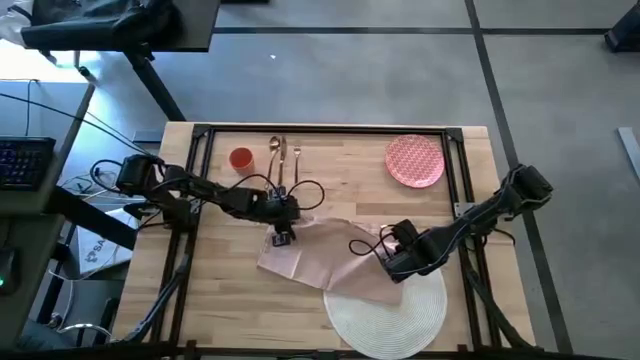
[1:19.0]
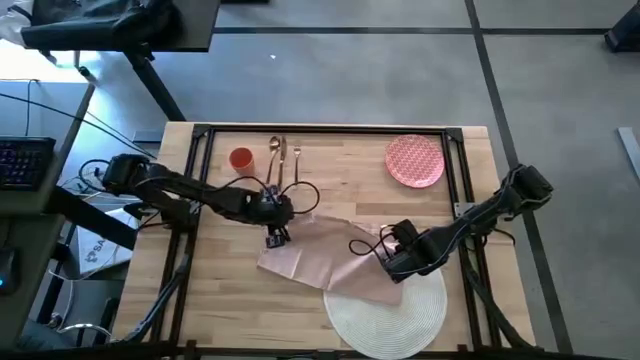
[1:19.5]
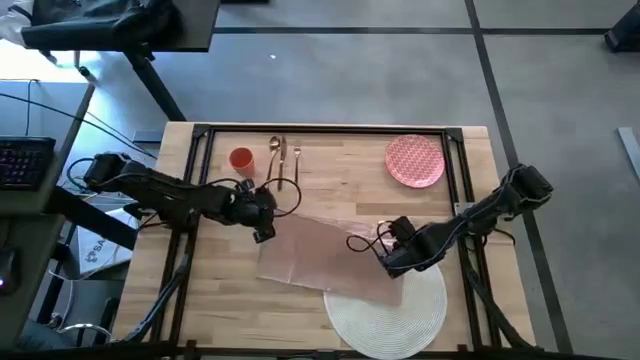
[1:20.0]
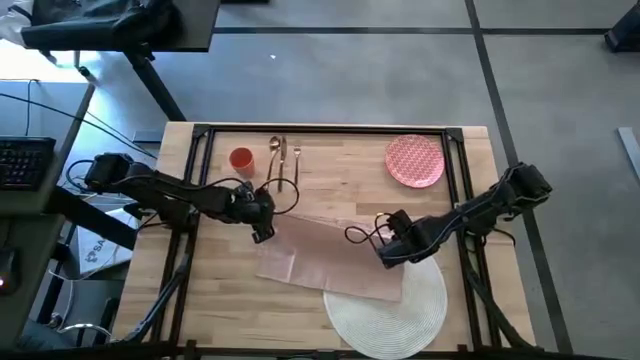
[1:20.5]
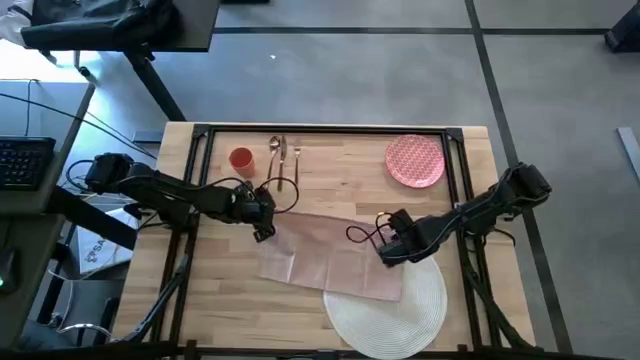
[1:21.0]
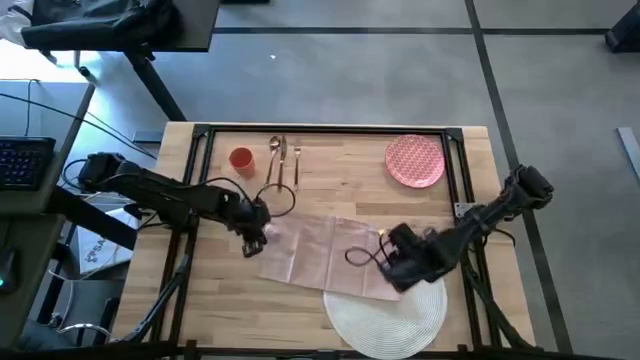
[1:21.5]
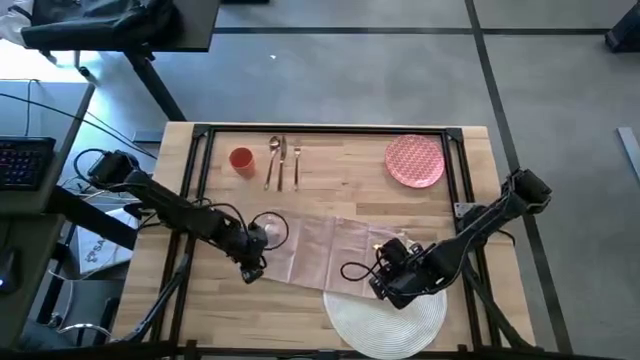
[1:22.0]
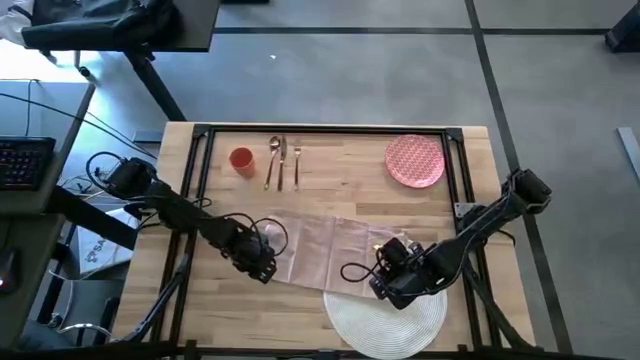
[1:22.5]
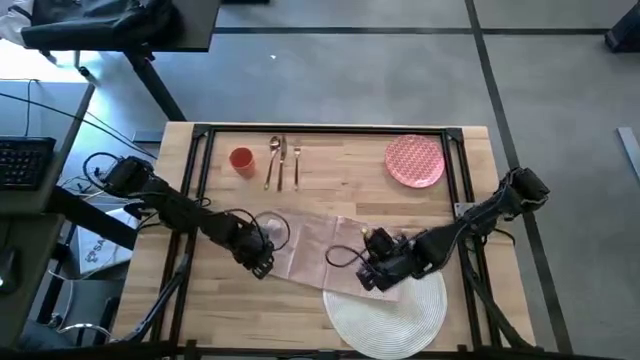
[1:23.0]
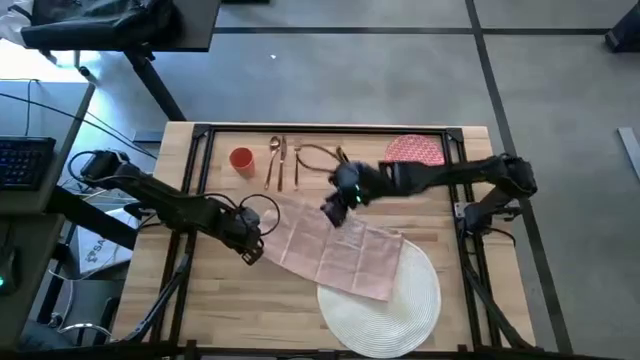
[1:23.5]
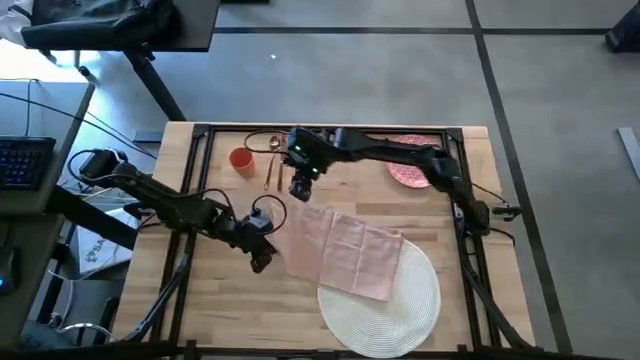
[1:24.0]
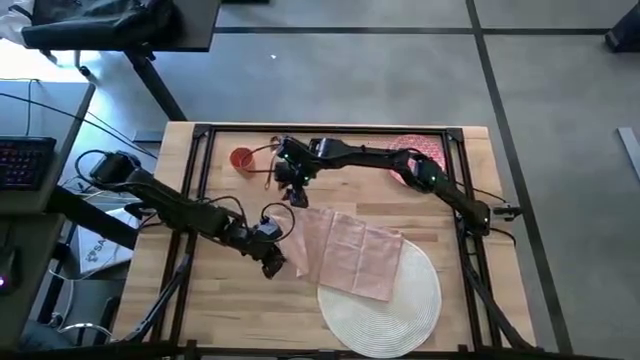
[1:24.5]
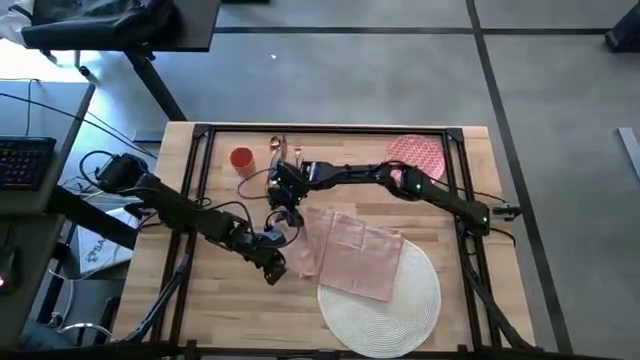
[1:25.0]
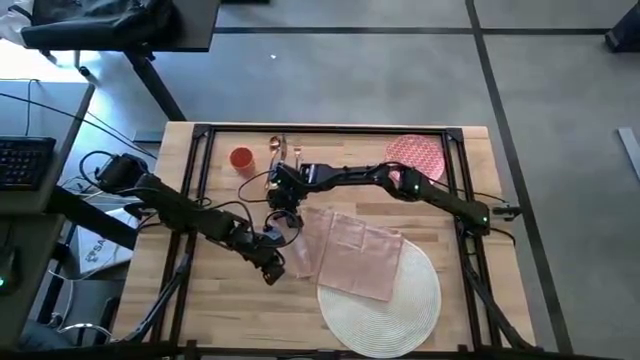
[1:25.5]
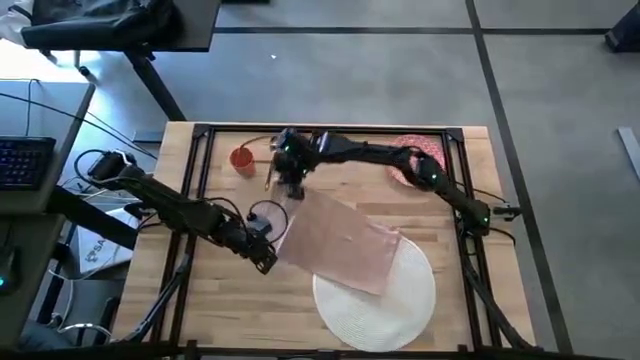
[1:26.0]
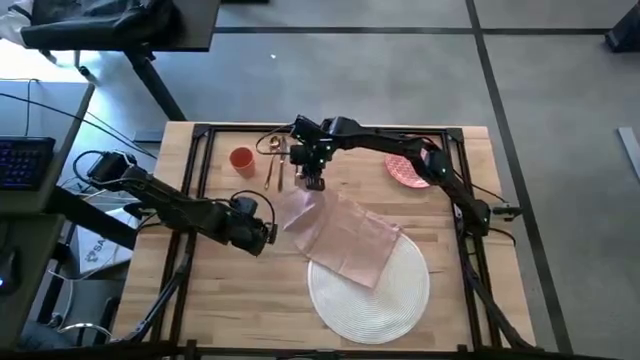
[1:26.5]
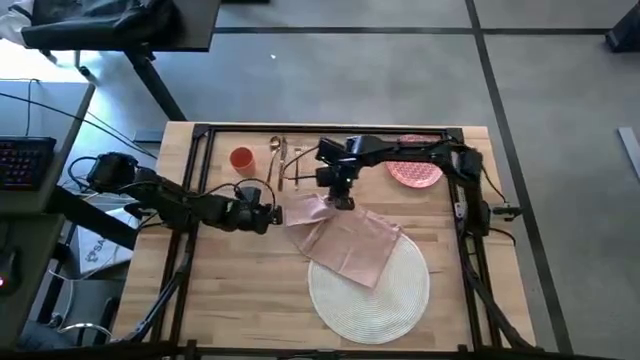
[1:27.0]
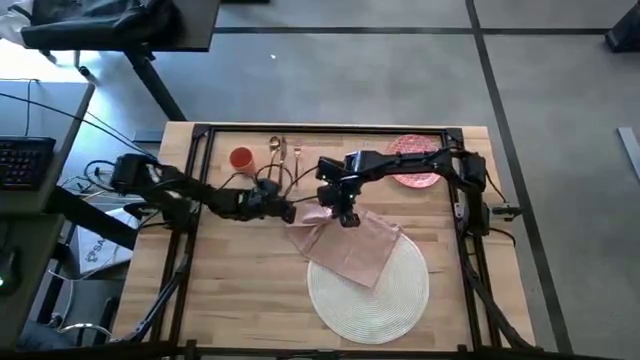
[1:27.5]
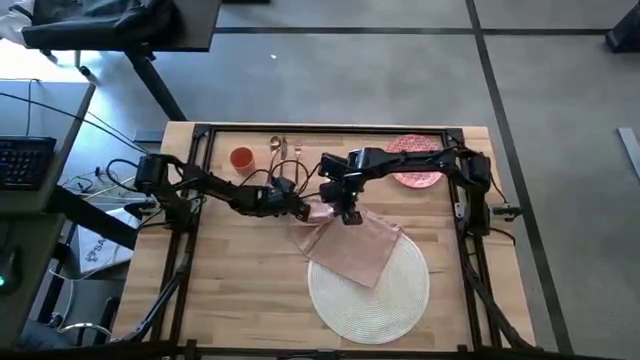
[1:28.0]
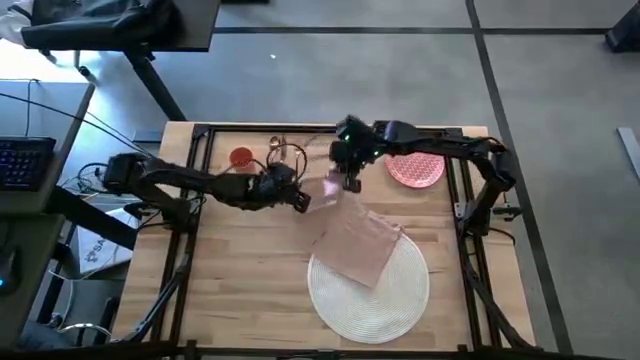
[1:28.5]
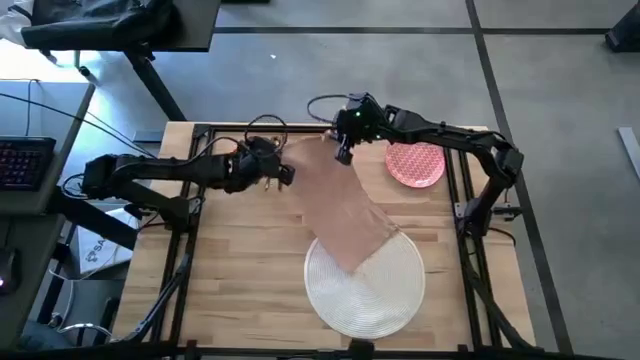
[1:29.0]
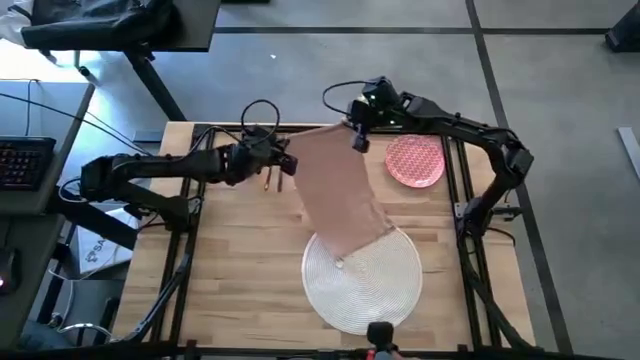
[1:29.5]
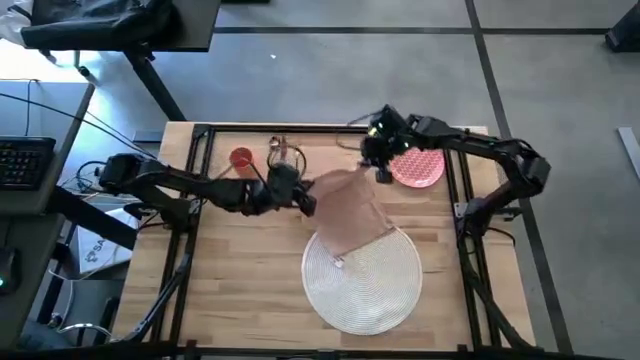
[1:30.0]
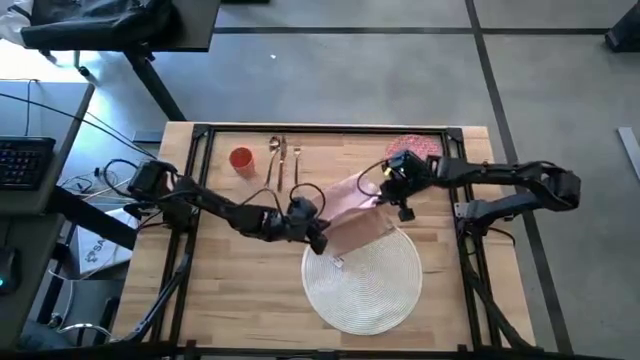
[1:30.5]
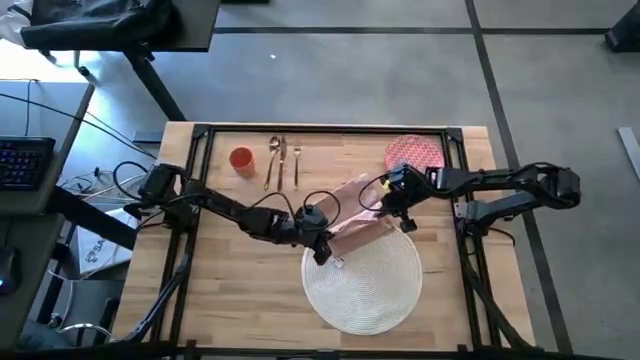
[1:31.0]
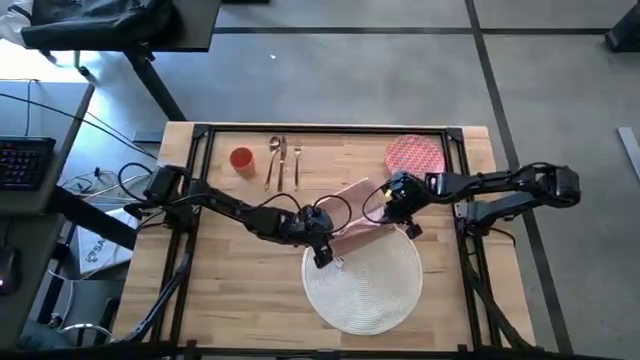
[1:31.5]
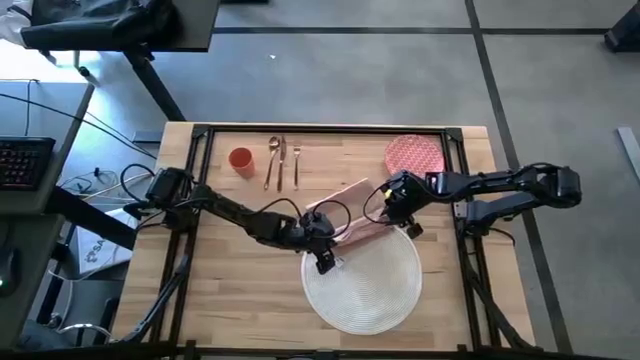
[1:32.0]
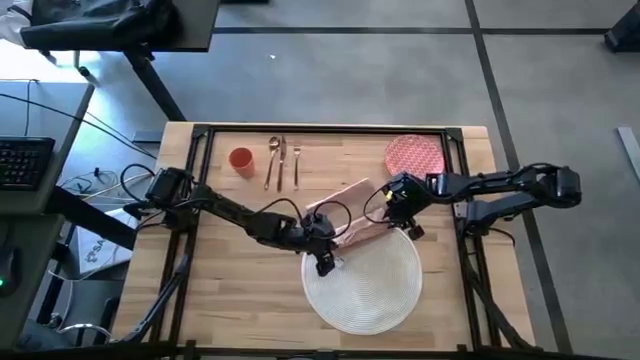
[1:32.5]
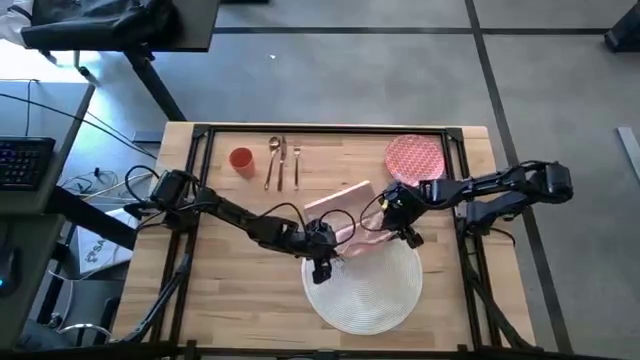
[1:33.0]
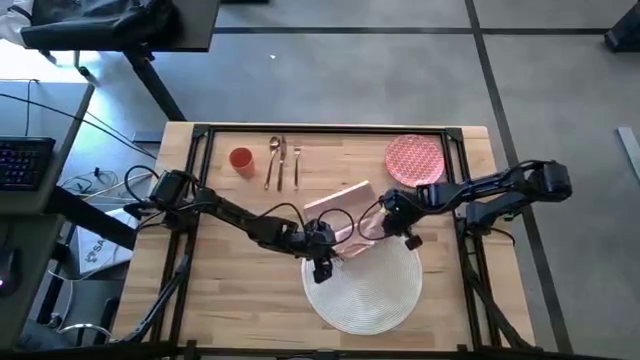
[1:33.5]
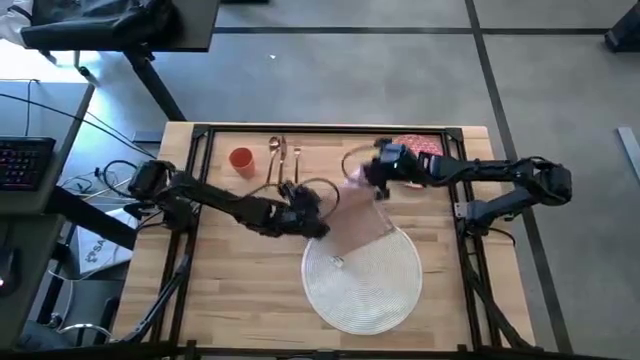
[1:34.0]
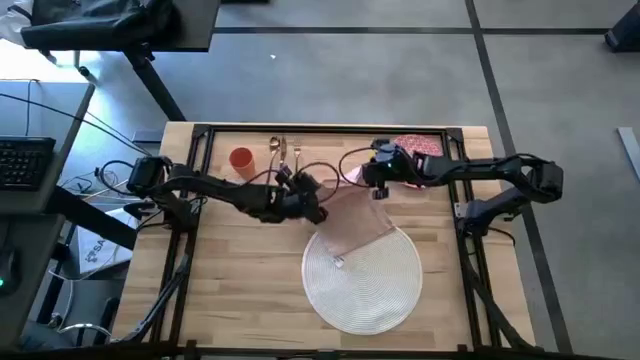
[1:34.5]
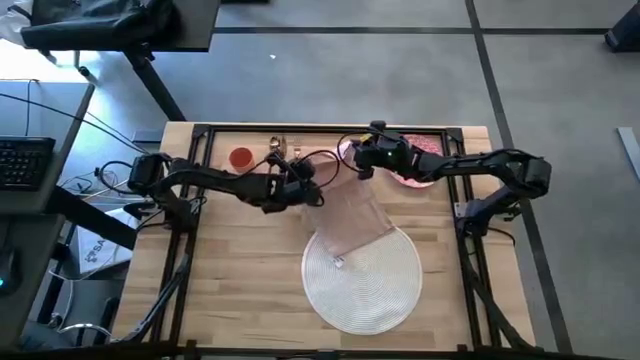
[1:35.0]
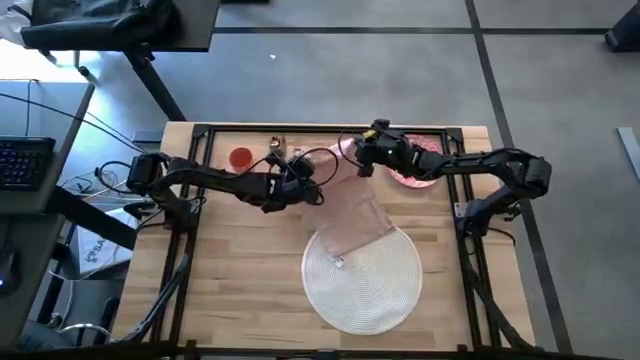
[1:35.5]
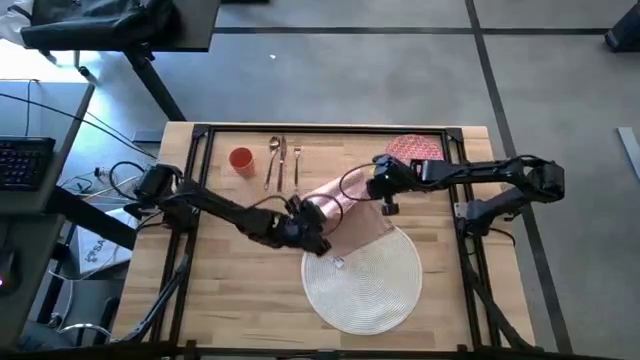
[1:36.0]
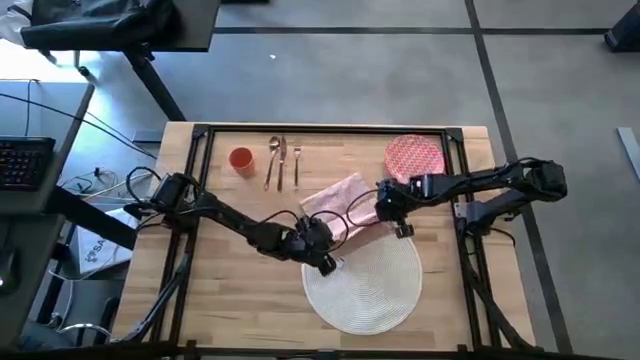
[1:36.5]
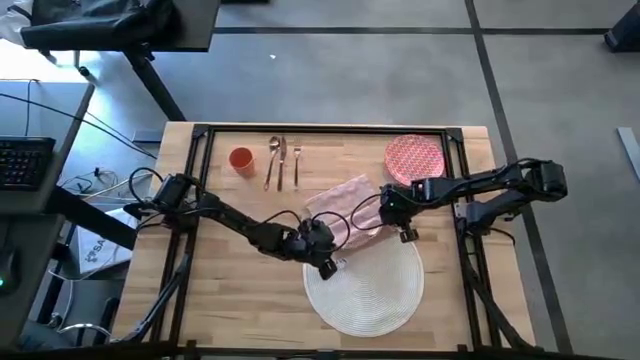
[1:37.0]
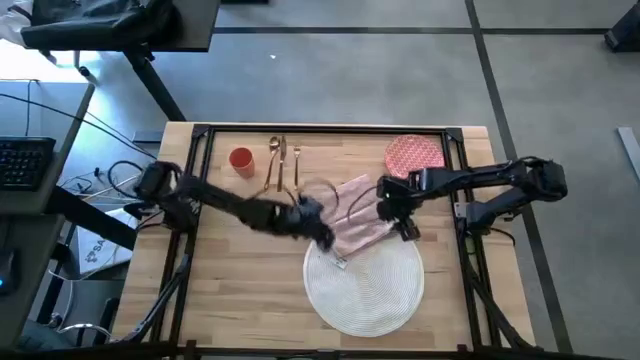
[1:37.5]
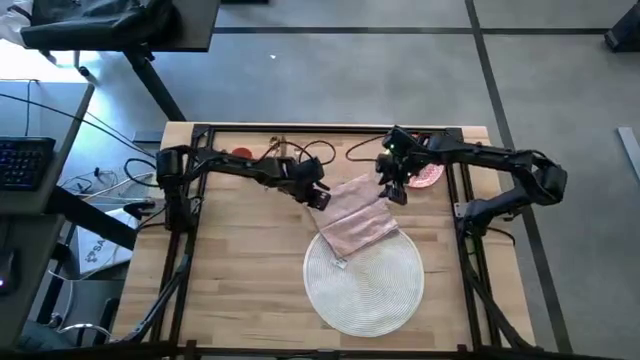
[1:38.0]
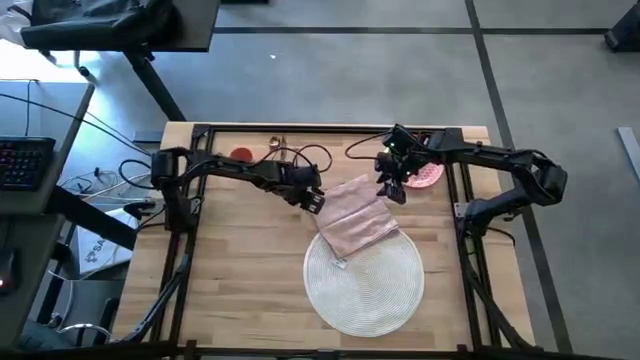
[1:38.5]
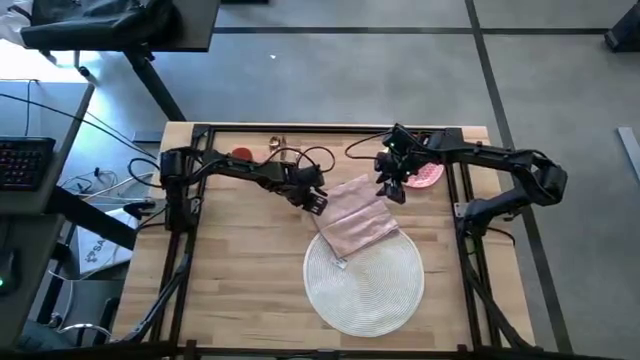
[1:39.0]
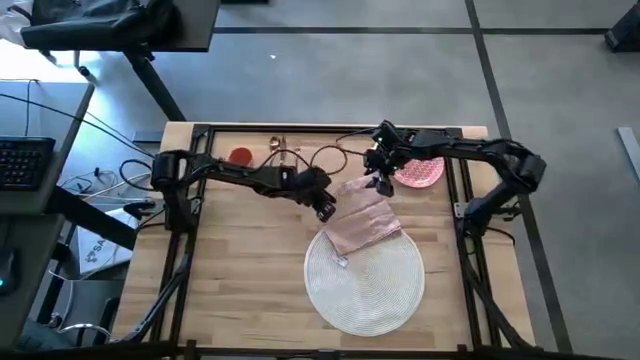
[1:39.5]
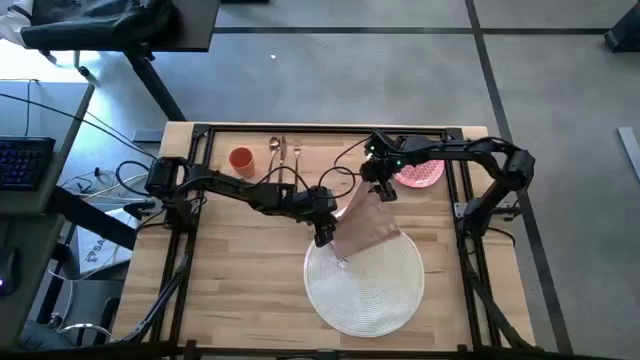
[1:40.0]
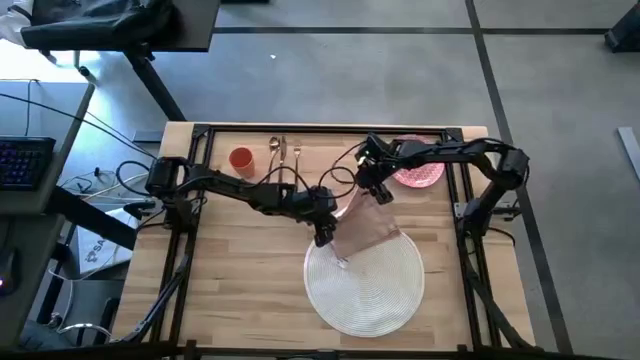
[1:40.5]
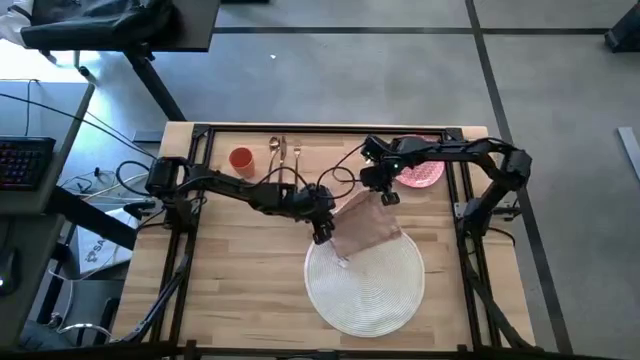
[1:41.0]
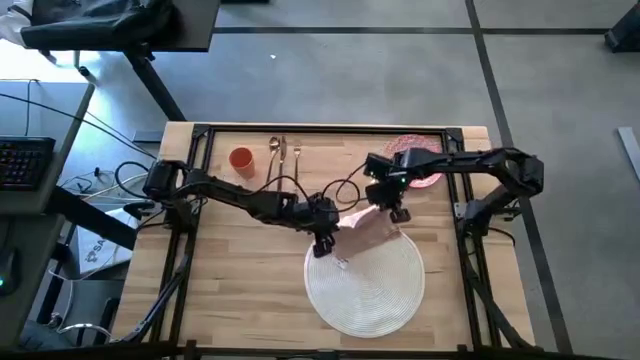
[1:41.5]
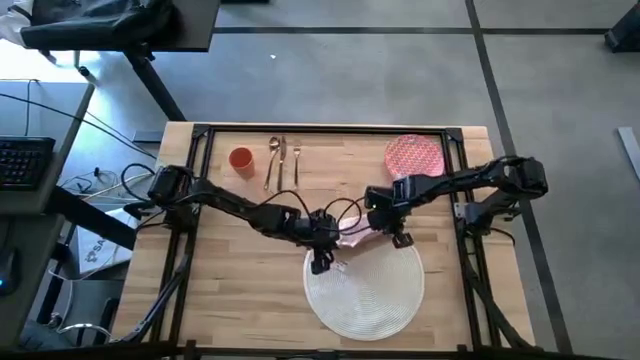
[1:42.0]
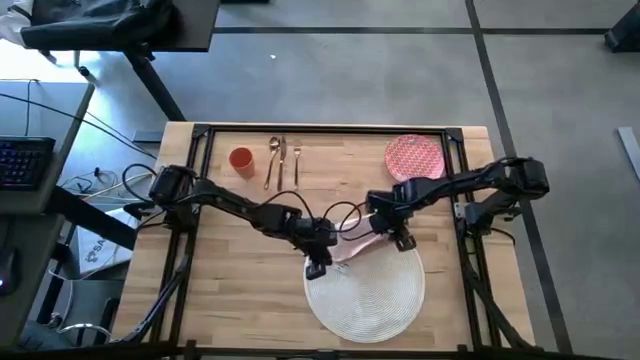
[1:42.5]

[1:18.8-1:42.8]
Task: Set table place
Fold pink table napkin
